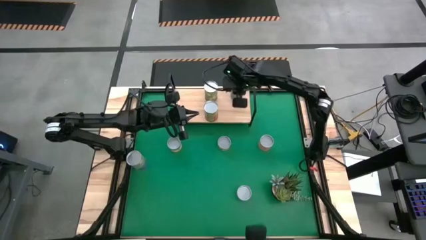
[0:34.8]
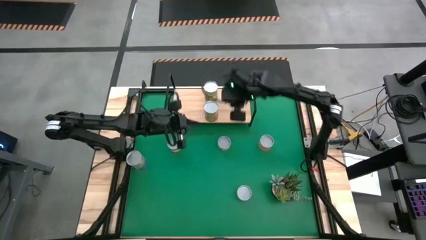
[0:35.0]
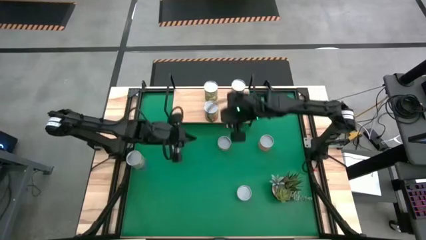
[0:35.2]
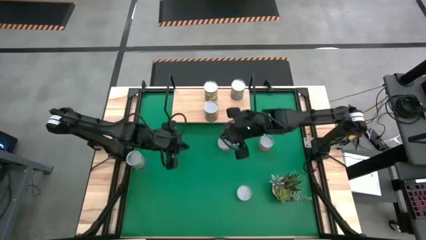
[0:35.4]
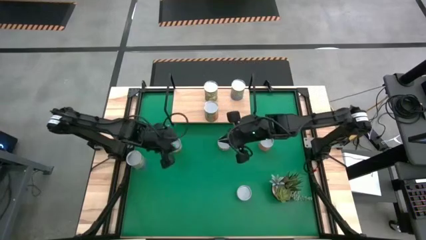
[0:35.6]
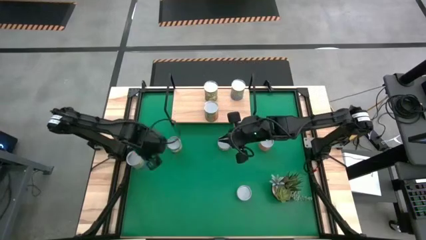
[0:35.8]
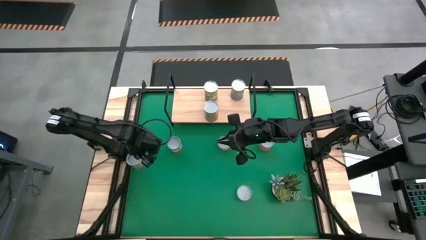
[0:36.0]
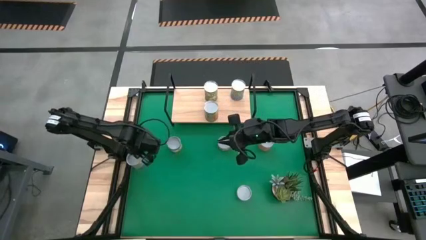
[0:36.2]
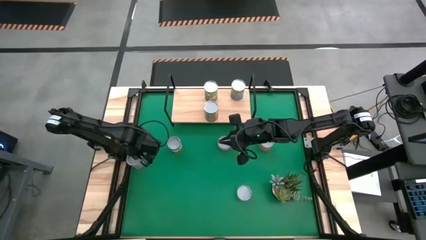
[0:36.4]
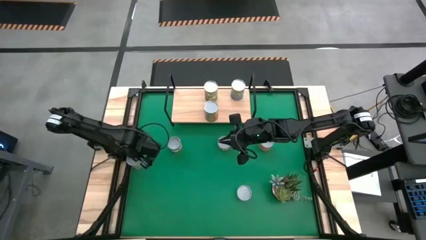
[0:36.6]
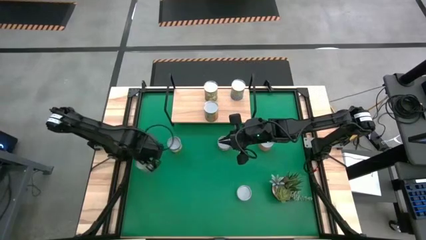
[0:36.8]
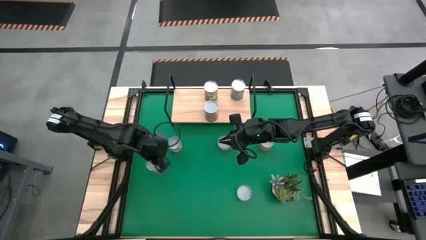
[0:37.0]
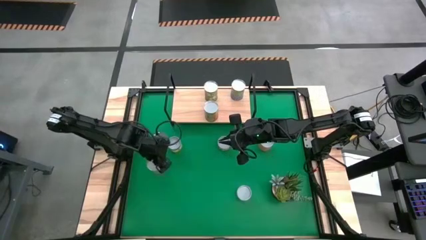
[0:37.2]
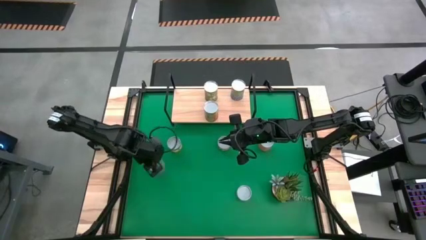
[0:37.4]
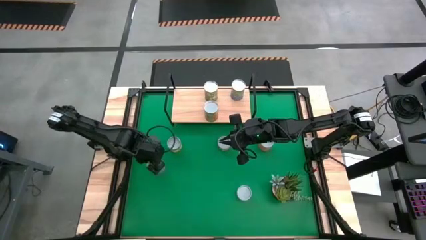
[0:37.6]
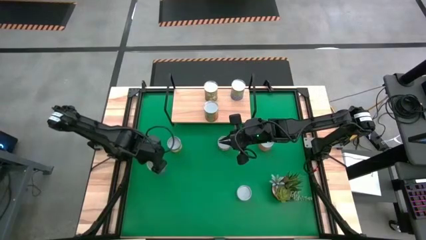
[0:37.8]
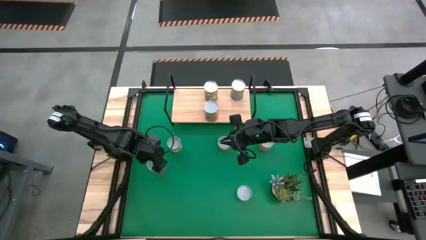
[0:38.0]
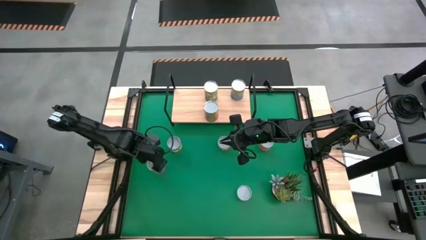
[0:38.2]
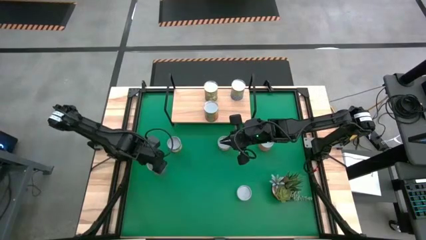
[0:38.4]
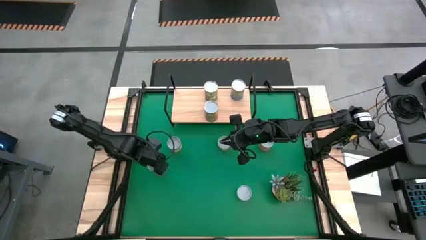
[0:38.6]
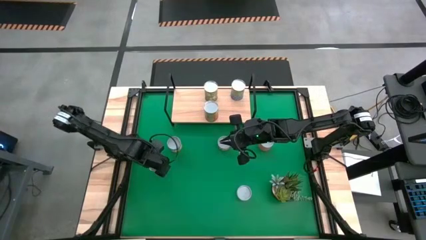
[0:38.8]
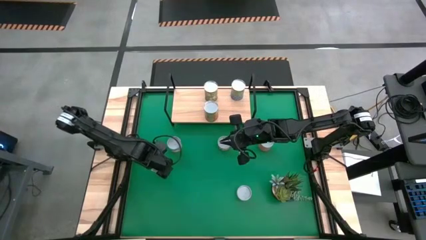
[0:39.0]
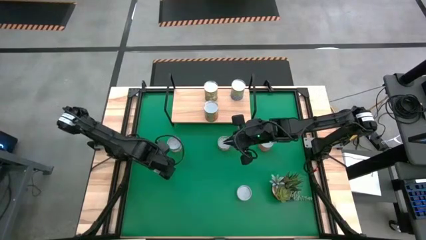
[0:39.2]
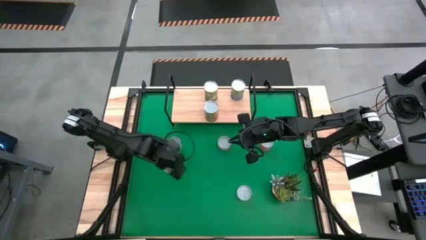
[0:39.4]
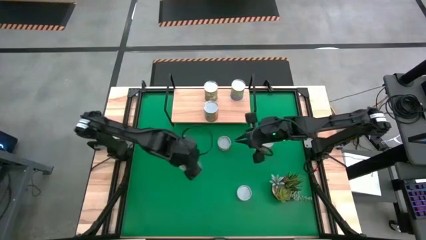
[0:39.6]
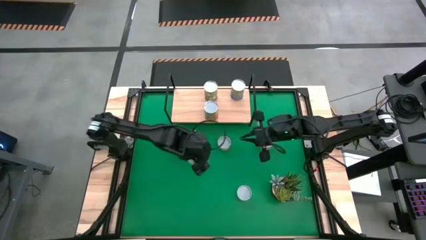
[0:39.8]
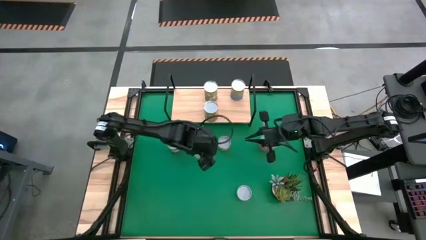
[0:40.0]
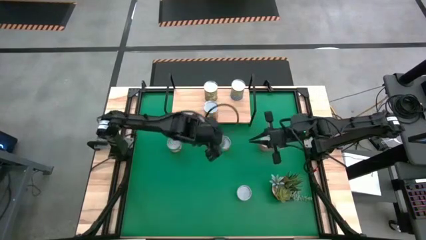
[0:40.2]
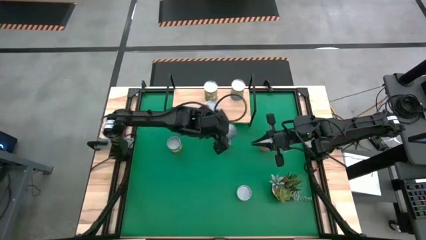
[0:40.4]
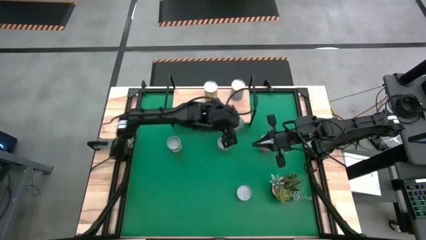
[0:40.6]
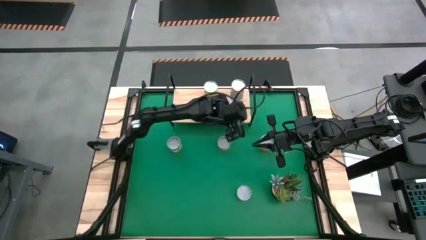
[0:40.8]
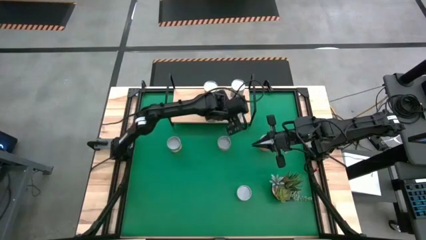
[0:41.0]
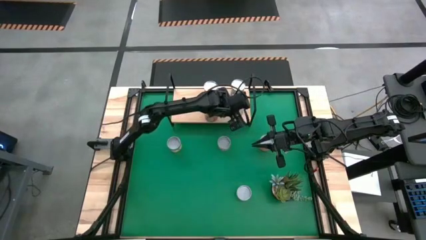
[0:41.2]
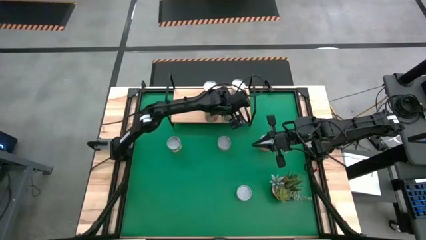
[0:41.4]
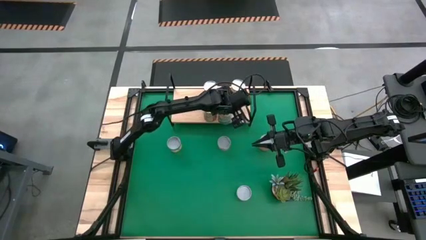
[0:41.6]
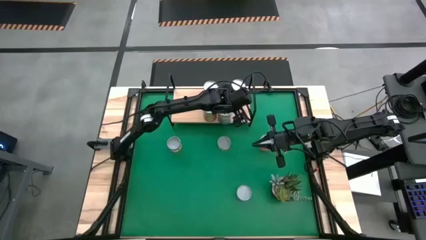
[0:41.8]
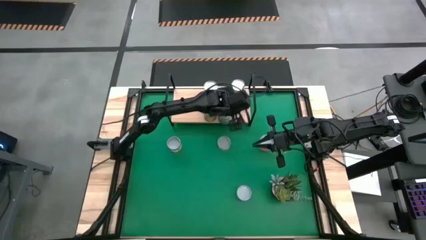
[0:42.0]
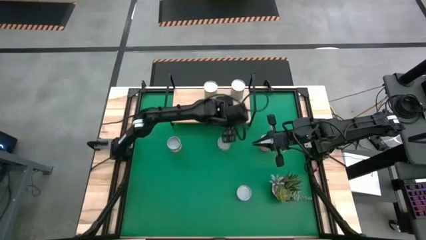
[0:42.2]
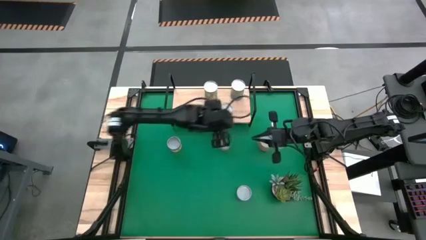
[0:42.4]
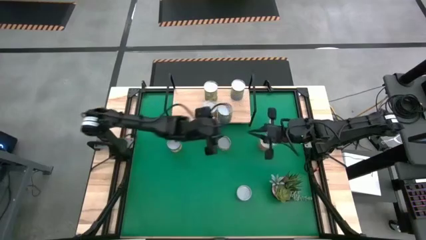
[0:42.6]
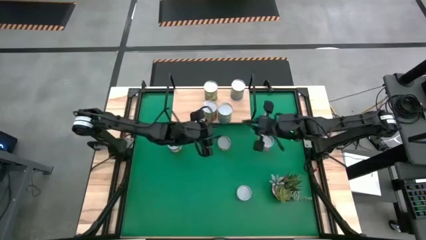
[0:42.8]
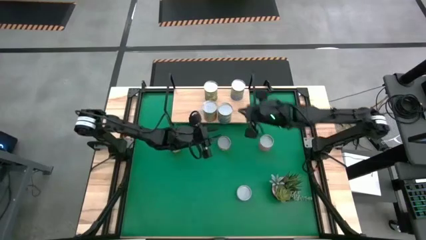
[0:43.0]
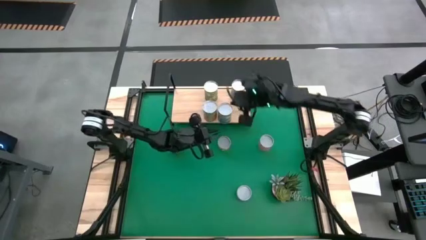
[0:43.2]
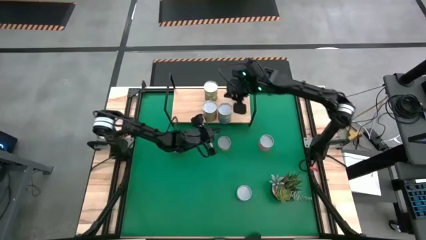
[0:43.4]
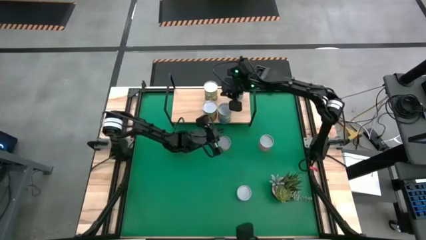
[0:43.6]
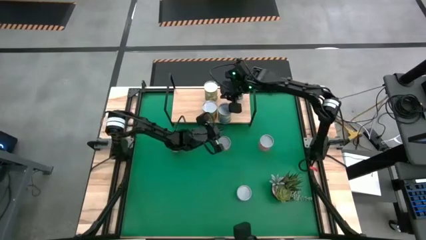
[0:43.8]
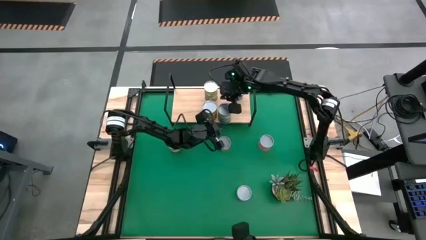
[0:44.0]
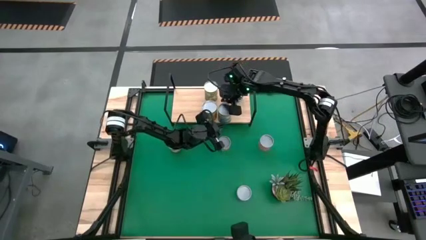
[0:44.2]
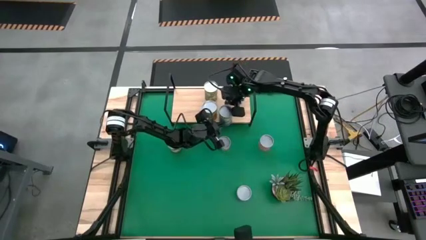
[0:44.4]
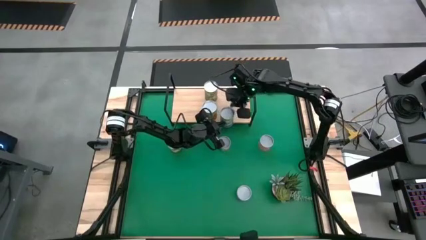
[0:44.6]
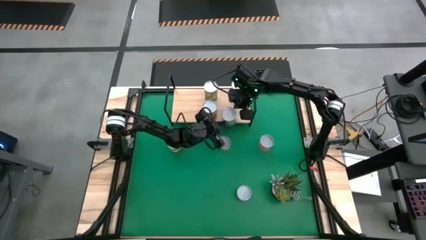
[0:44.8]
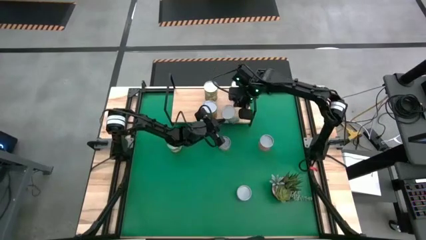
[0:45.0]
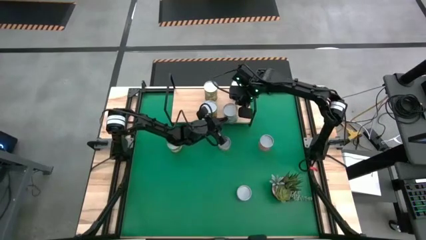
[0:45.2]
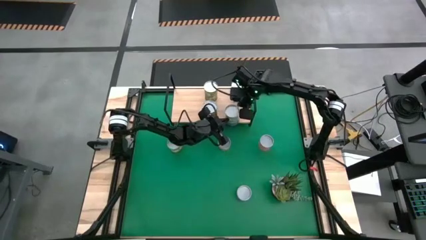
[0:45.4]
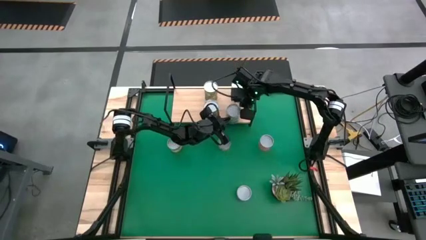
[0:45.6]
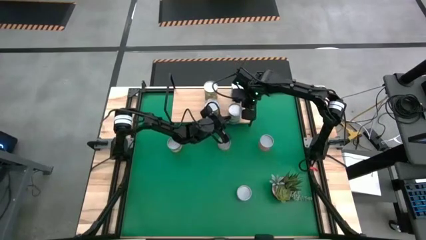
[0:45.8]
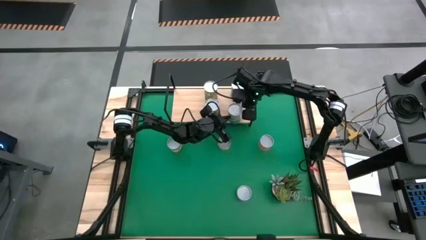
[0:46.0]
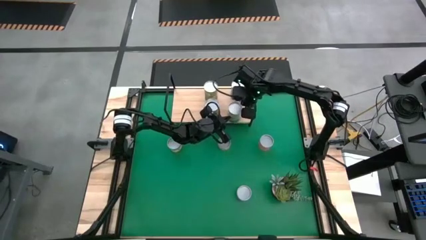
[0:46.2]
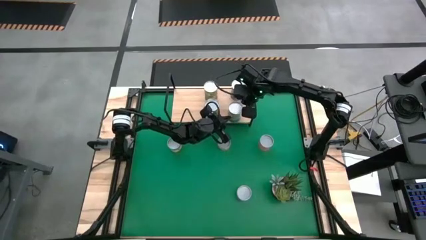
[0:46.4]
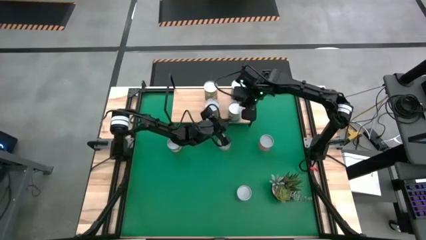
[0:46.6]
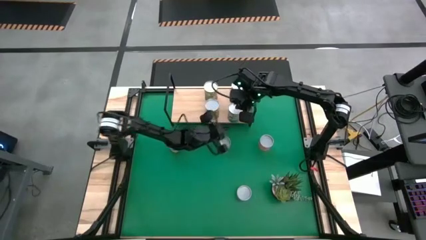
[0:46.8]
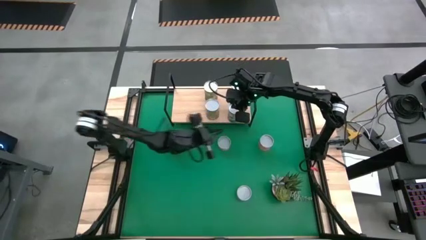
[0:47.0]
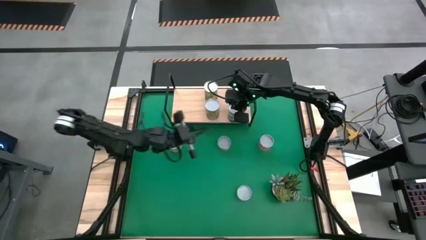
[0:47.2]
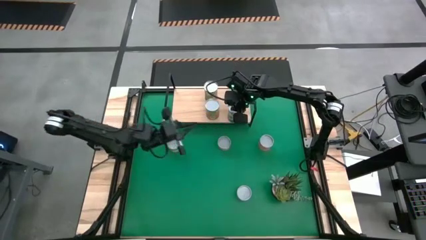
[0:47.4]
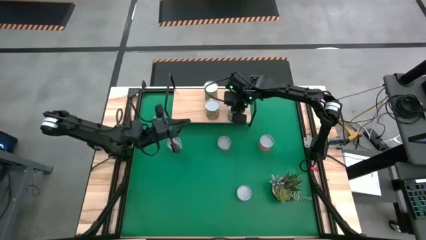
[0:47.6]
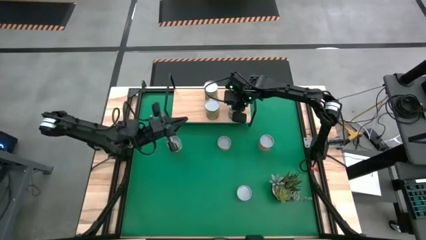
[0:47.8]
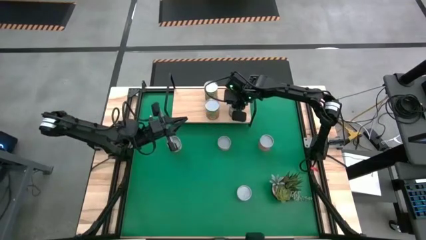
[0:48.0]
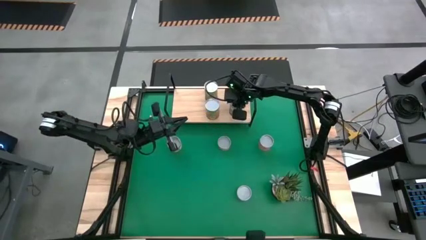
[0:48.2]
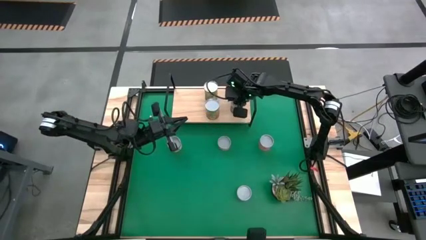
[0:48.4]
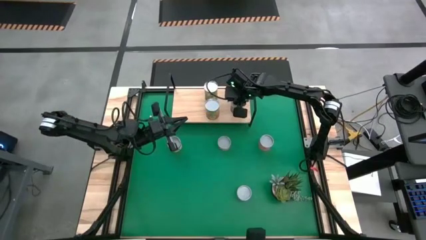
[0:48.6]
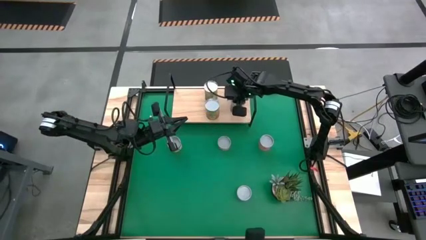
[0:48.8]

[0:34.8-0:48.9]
Task: Pick and place cans onto a shelf
Put the canned peas on the shelf

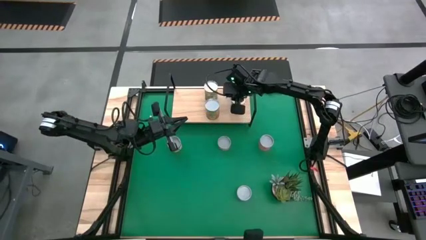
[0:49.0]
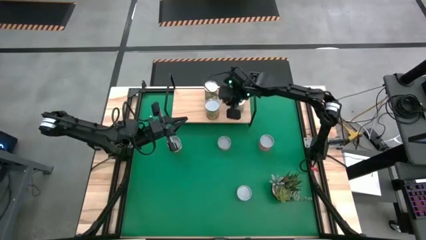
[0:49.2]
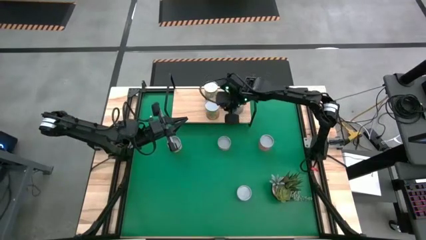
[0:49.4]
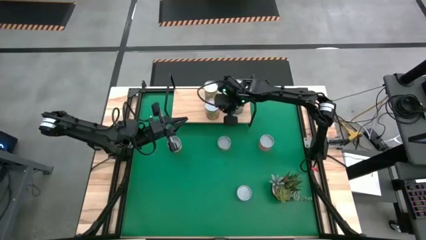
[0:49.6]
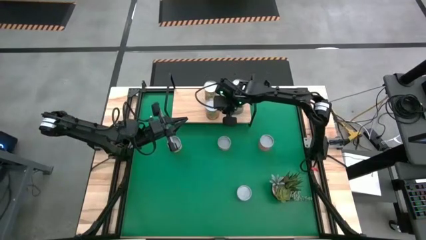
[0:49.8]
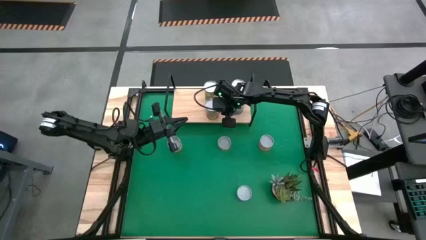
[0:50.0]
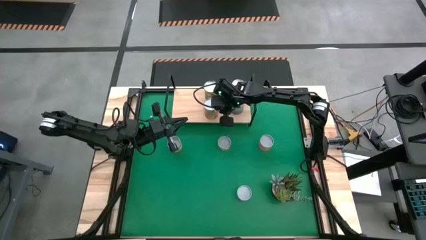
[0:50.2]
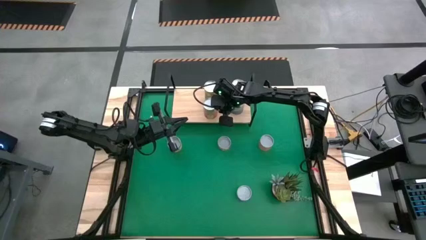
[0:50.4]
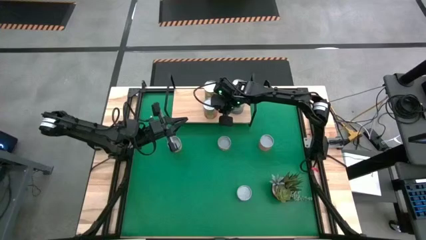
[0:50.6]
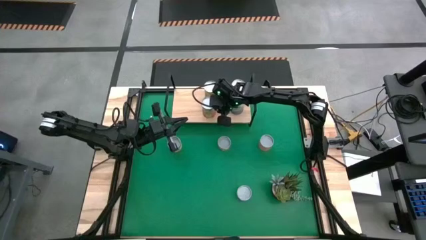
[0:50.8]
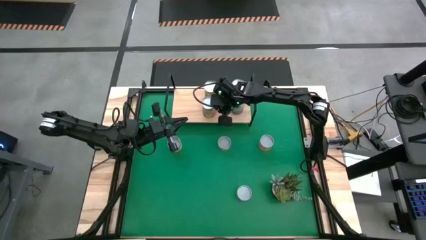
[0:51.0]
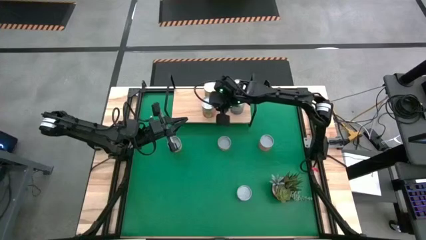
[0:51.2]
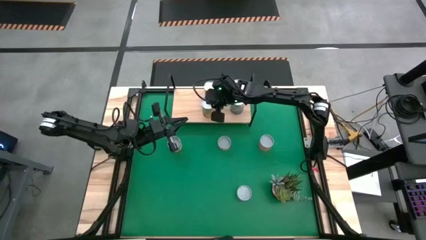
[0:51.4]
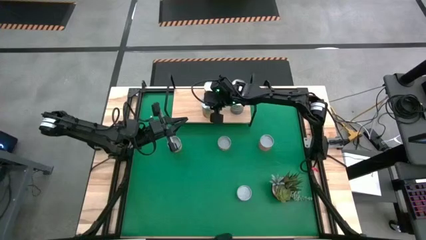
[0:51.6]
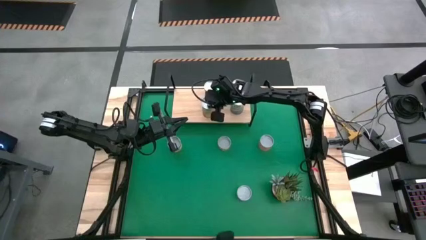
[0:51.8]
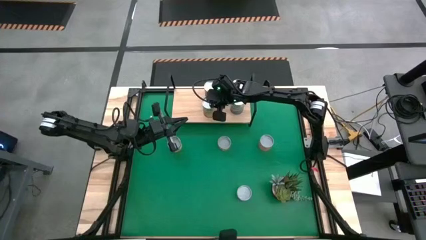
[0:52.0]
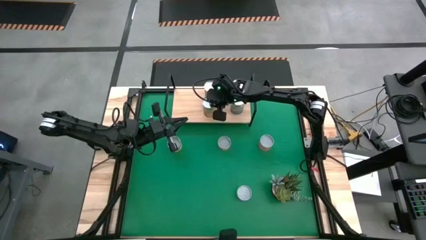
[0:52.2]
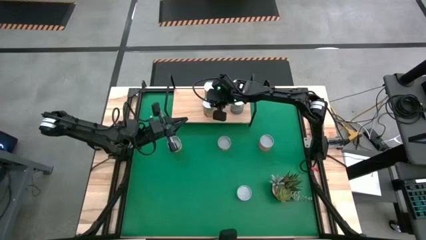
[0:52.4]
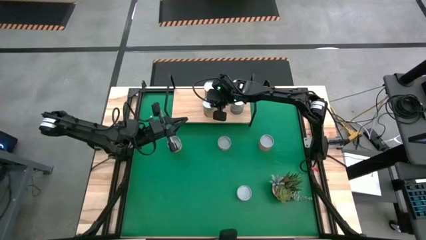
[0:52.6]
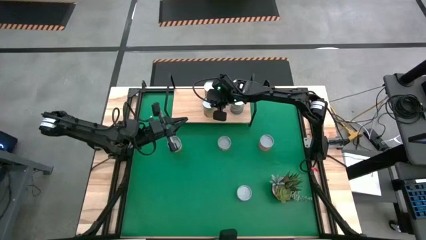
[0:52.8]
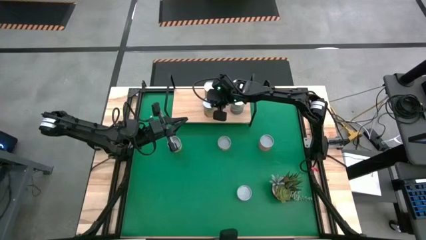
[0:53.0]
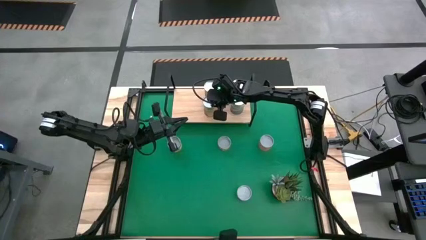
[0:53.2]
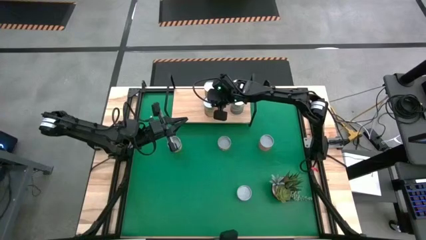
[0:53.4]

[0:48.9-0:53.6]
Adjust the canned pineapple on the shelf
